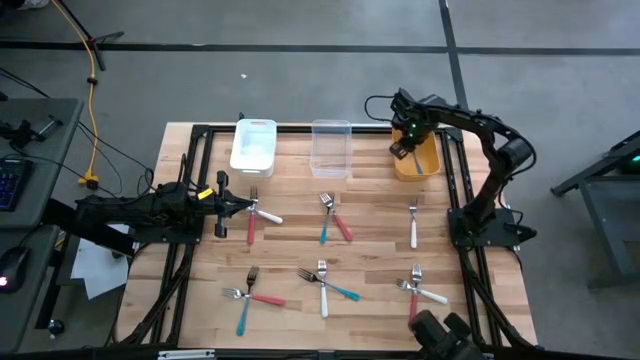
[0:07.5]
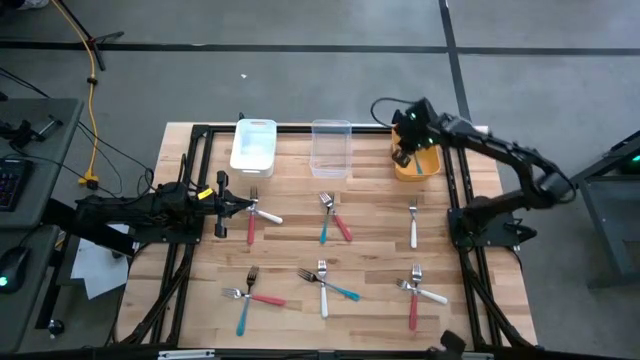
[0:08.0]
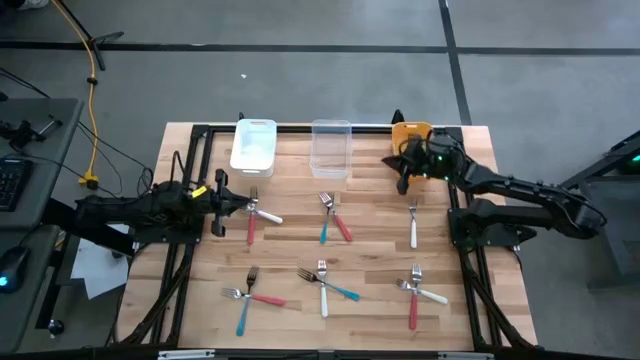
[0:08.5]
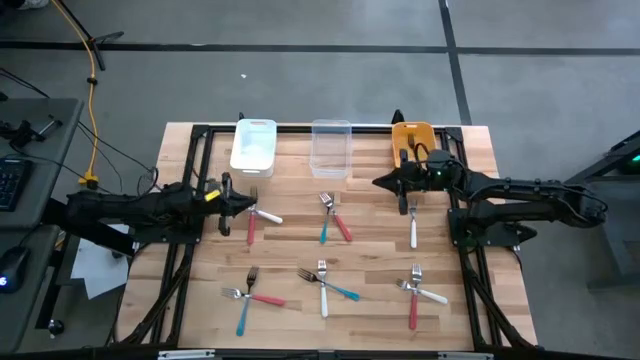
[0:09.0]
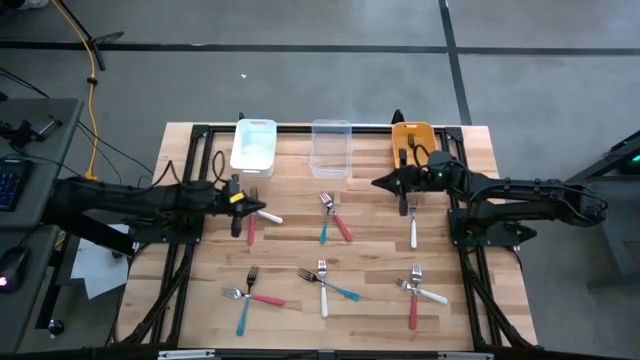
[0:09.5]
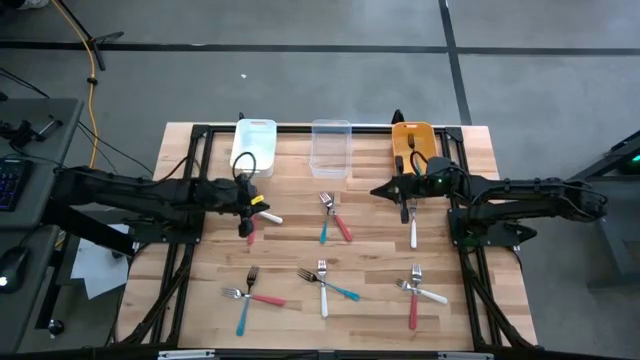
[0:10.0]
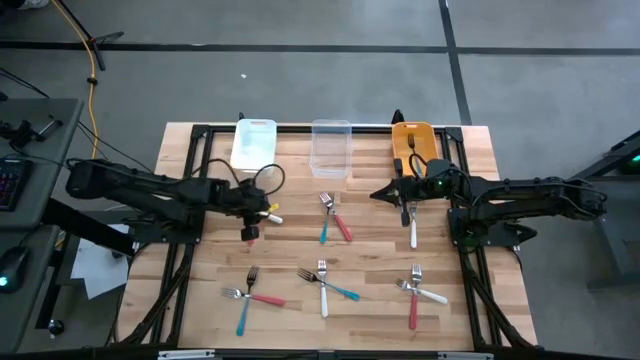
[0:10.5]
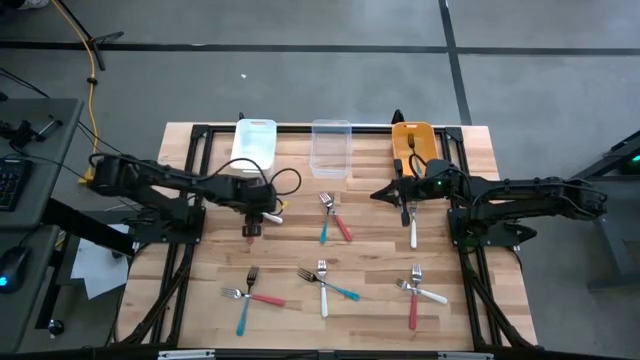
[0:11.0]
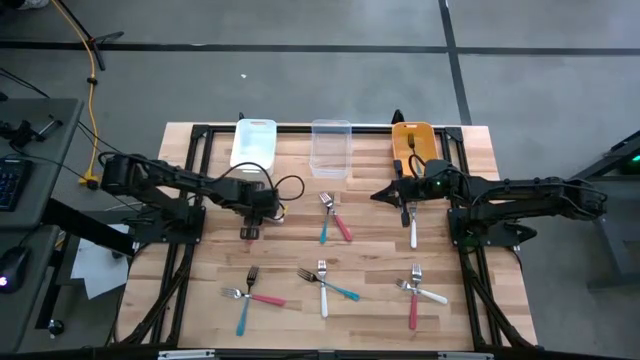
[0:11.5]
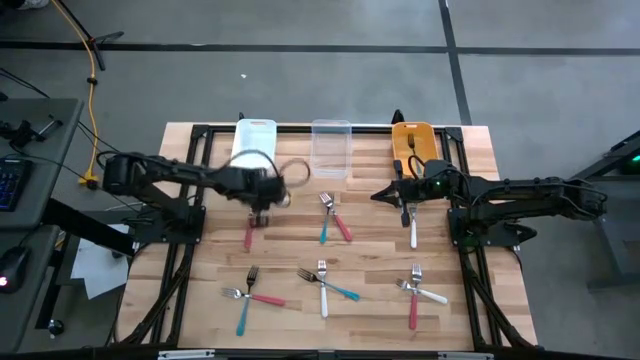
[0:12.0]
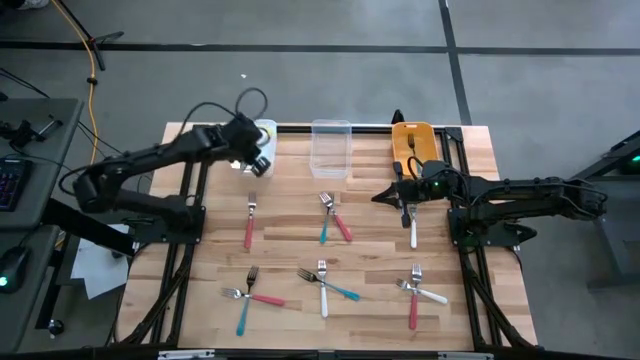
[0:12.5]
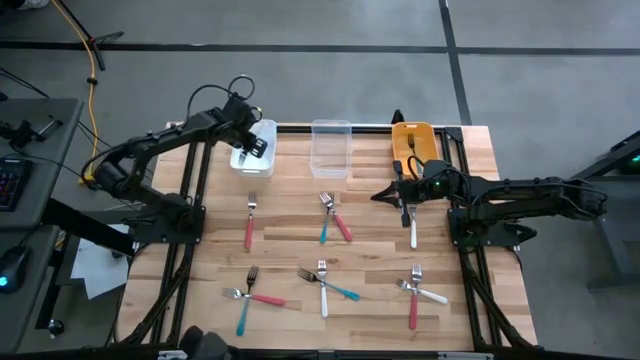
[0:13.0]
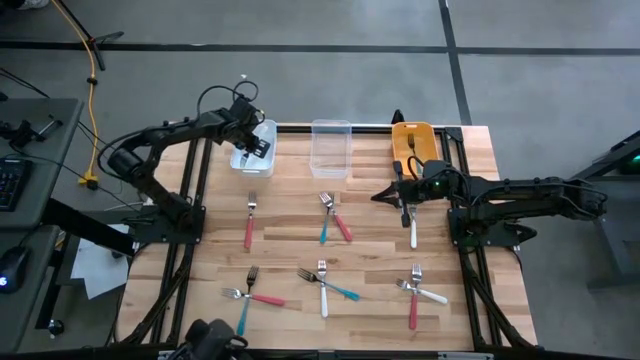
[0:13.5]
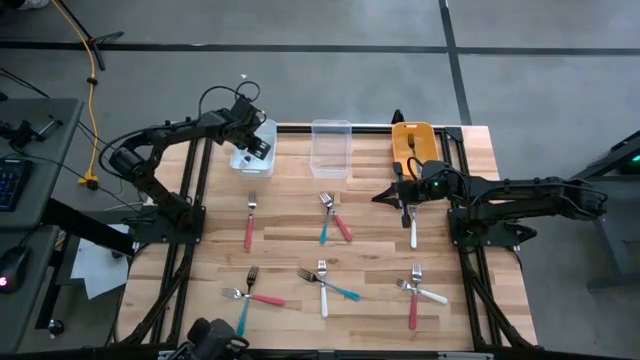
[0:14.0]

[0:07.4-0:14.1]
Task: Sort silverware by color (type)
Put the top left white fork into the white bin

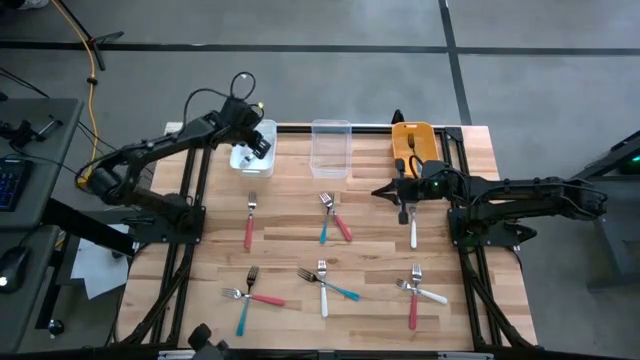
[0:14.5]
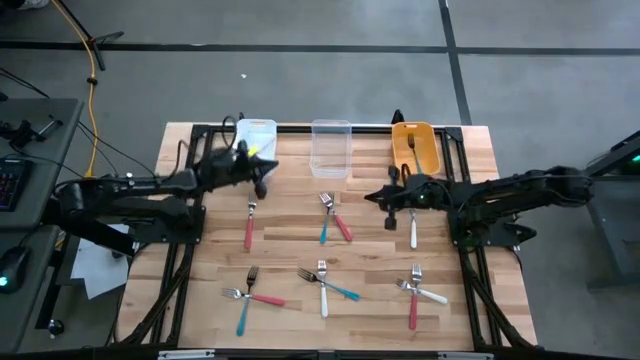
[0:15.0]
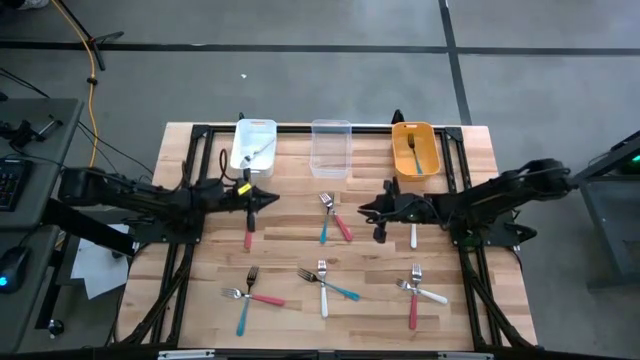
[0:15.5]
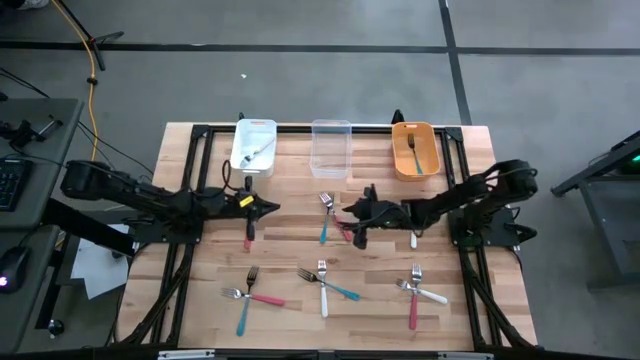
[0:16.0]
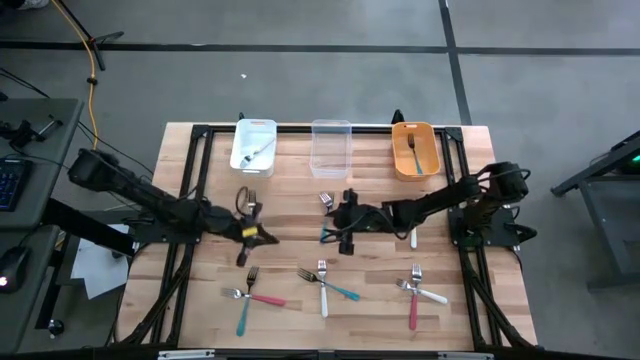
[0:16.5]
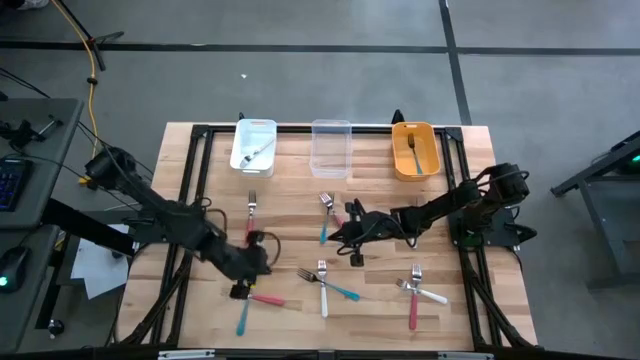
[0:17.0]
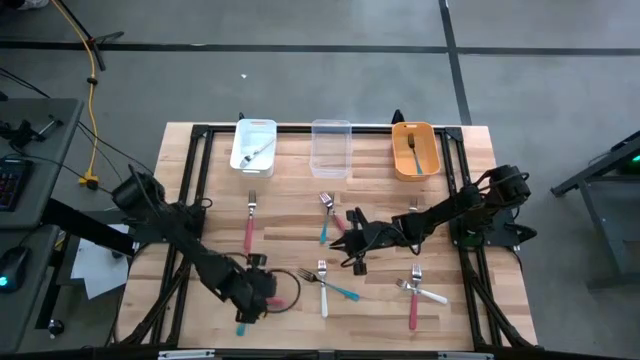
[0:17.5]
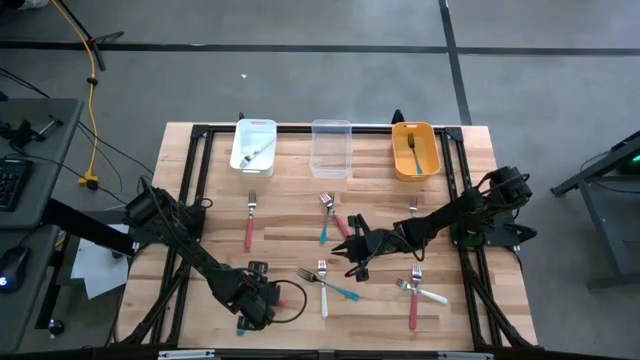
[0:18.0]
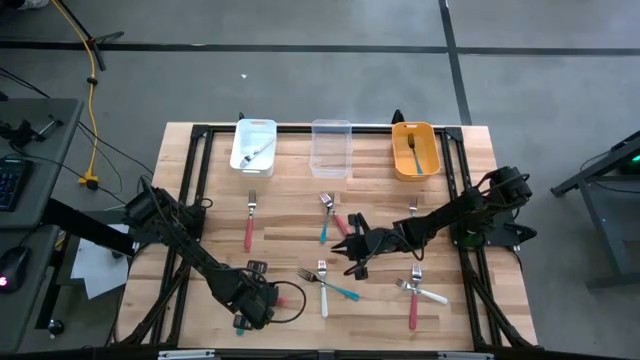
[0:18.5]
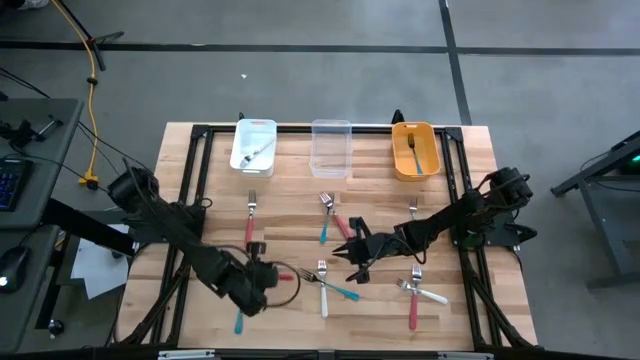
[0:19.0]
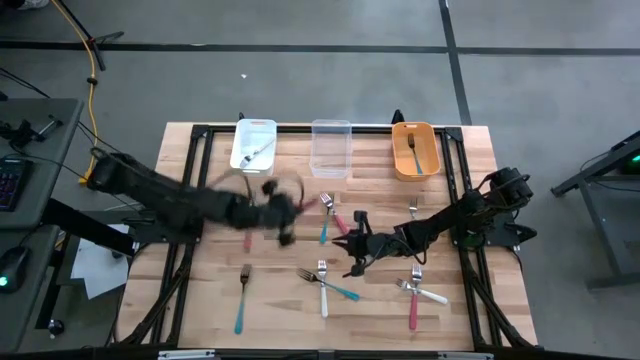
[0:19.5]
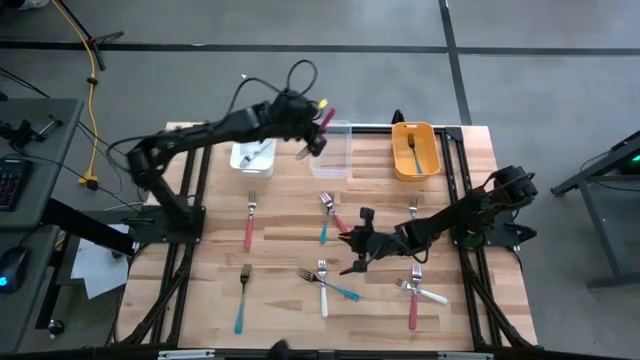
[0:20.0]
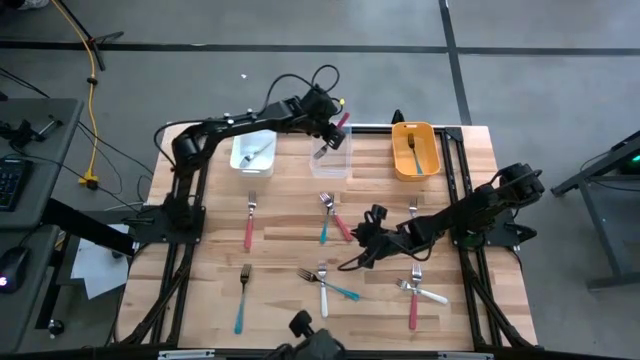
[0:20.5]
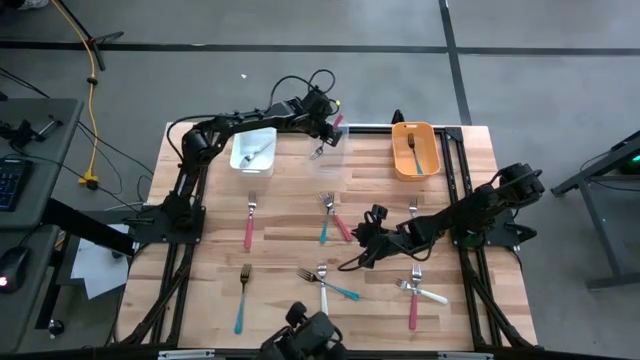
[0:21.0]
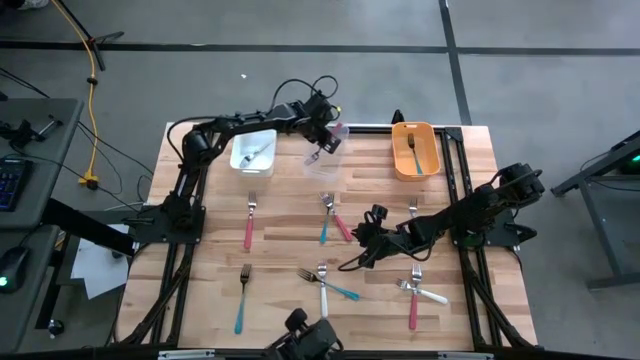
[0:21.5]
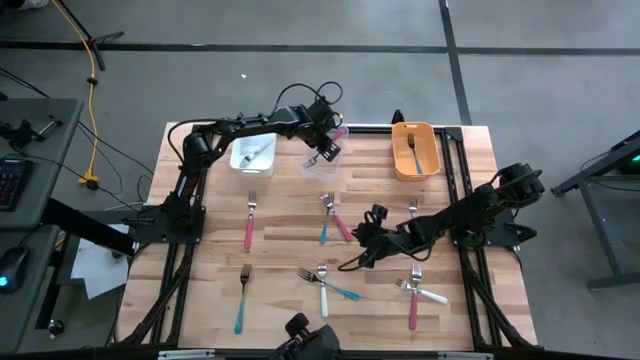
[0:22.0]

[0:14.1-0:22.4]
Put the bottom left pink fork into the transparent bin

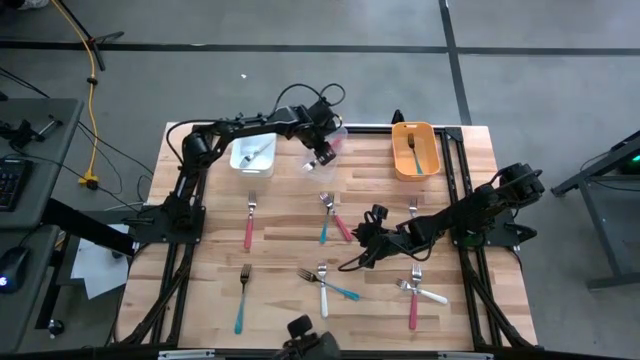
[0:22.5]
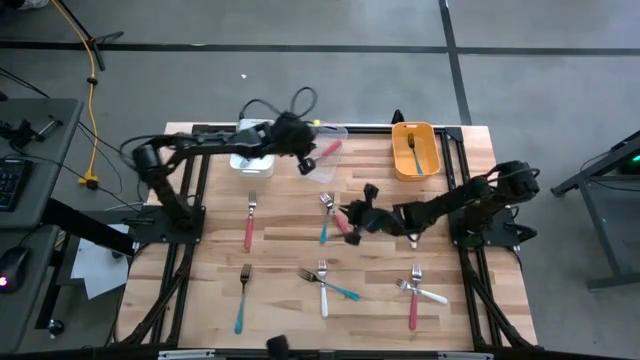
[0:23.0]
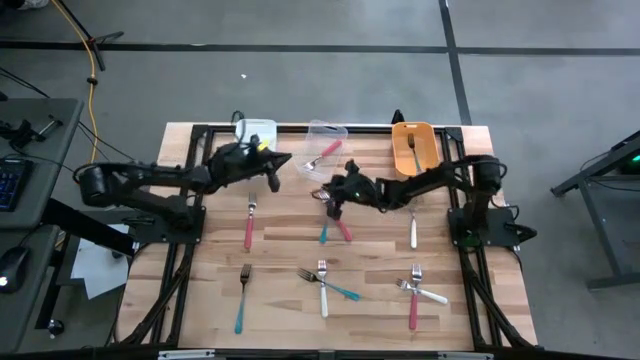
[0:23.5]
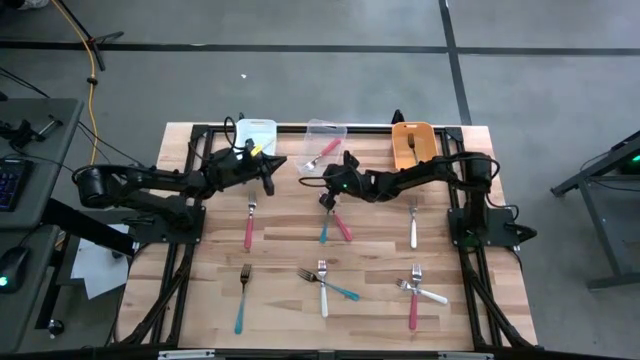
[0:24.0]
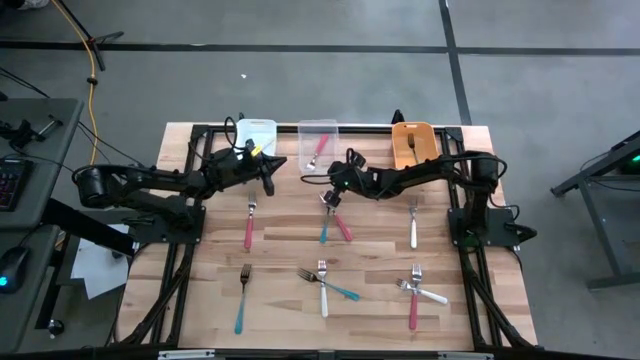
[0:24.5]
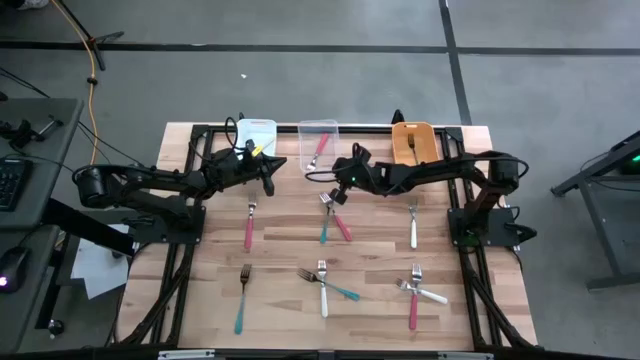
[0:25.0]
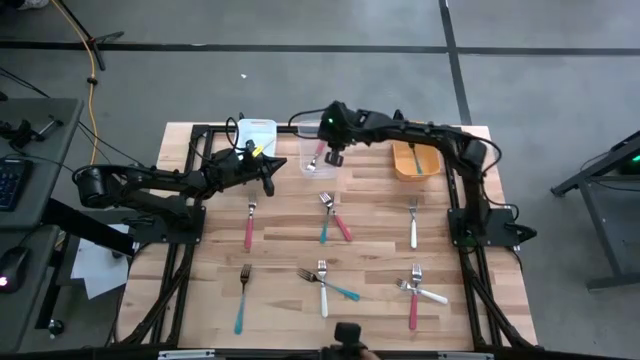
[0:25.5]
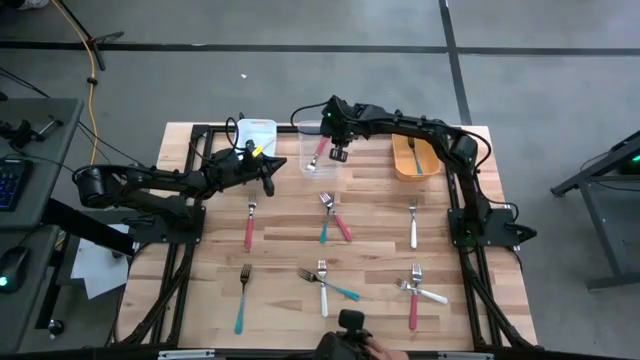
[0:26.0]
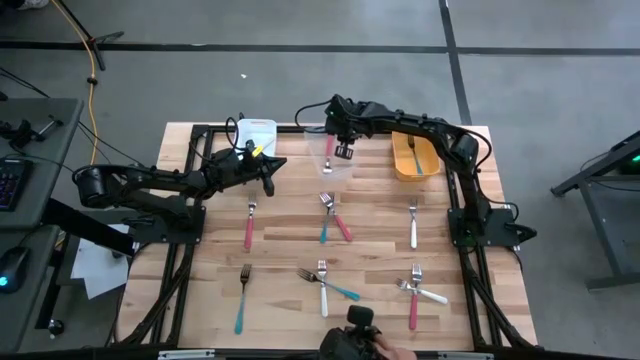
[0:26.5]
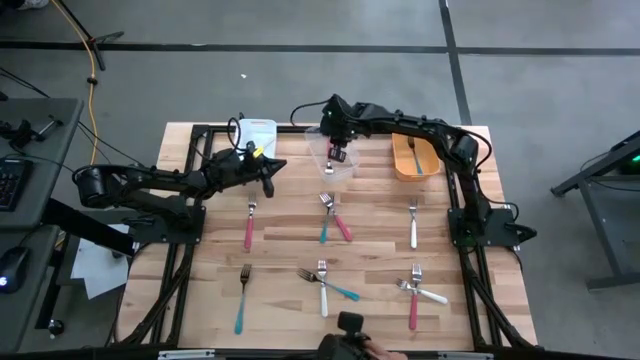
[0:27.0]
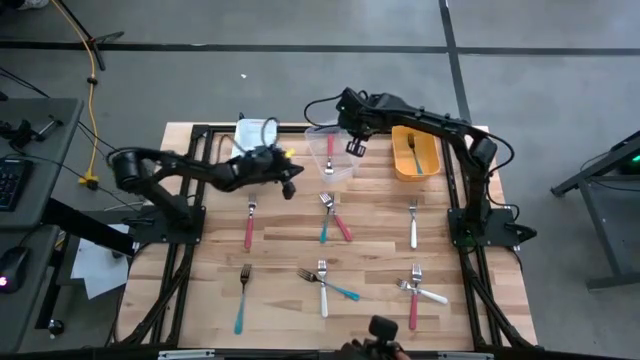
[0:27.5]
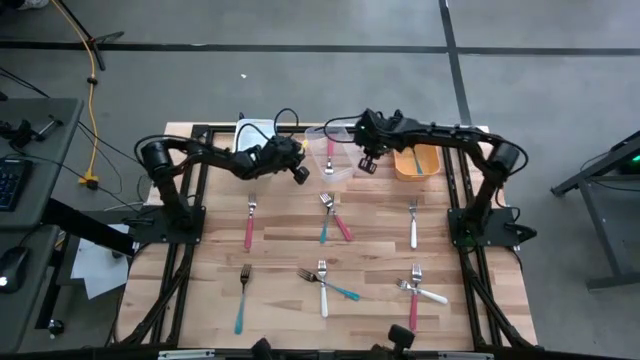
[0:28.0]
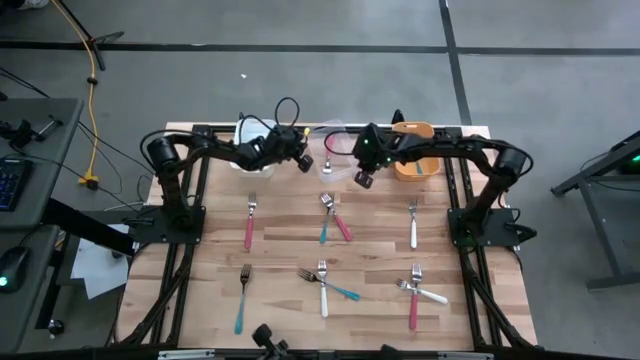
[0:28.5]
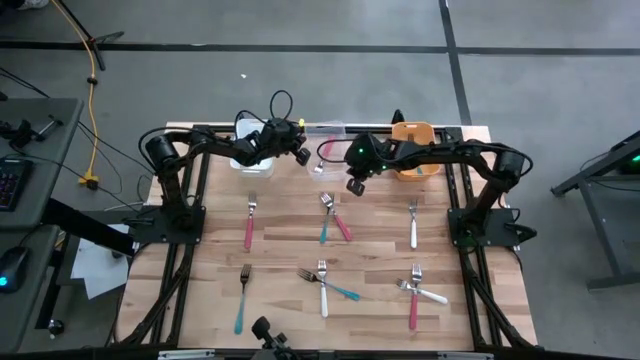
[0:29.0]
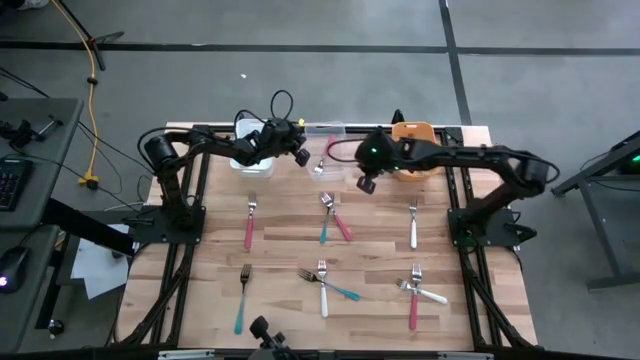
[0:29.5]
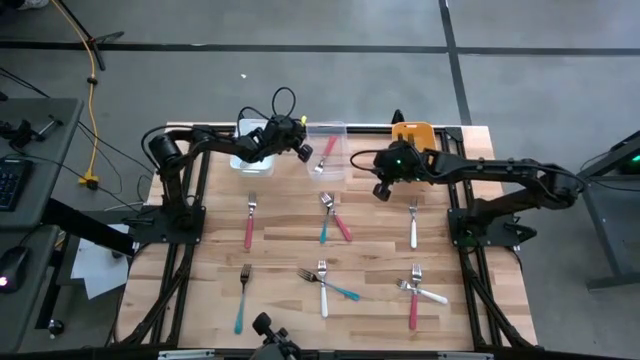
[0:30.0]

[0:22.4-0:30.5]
Adjust the transparent bin
